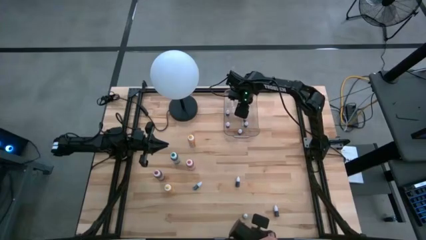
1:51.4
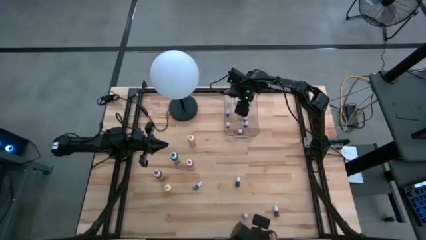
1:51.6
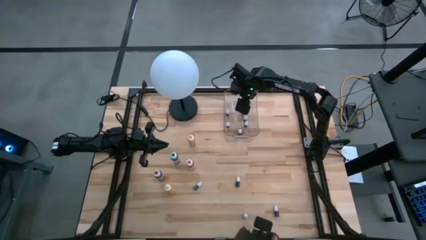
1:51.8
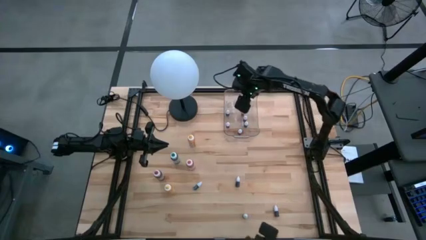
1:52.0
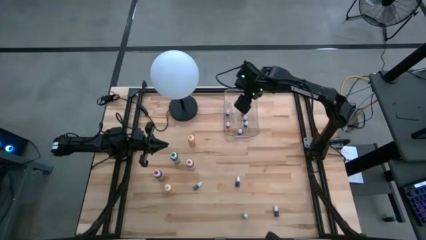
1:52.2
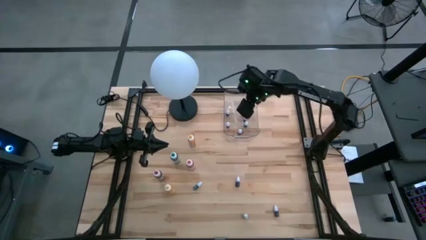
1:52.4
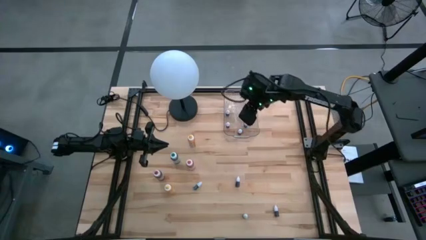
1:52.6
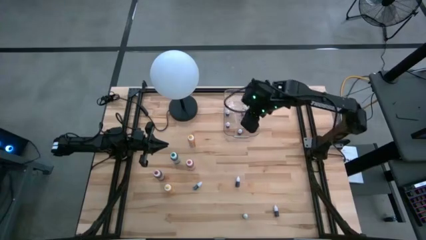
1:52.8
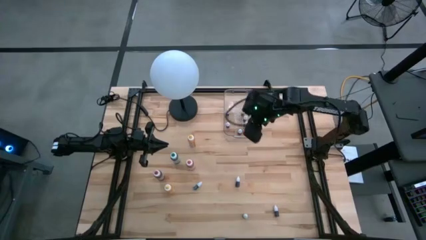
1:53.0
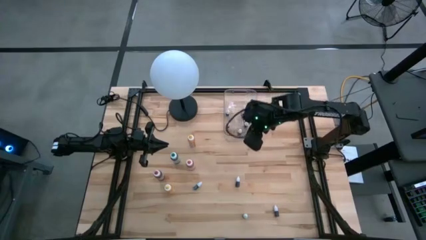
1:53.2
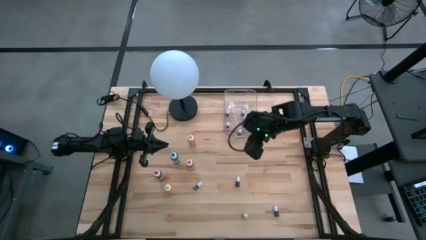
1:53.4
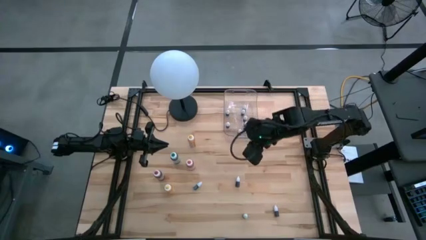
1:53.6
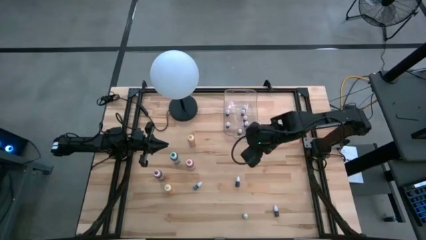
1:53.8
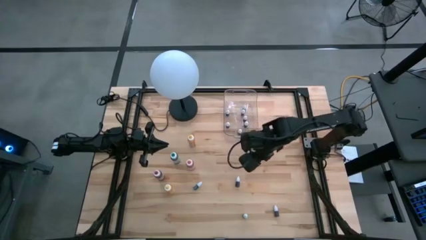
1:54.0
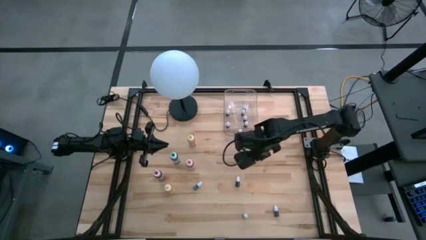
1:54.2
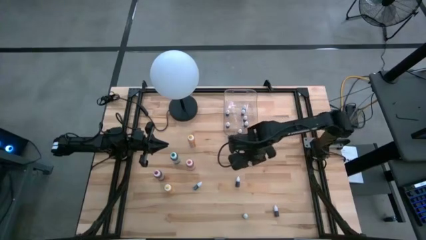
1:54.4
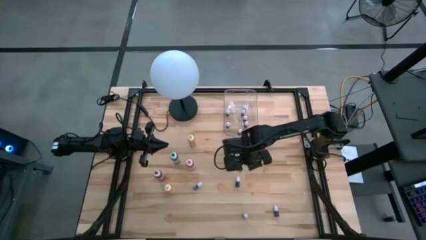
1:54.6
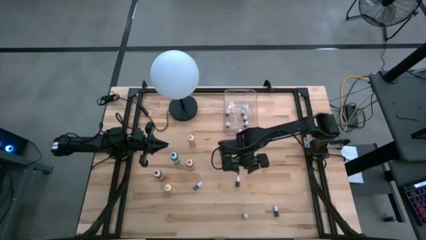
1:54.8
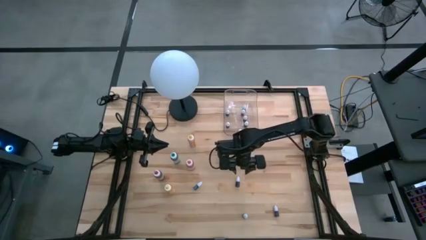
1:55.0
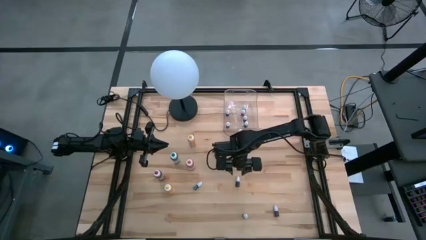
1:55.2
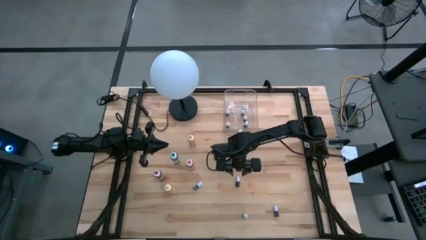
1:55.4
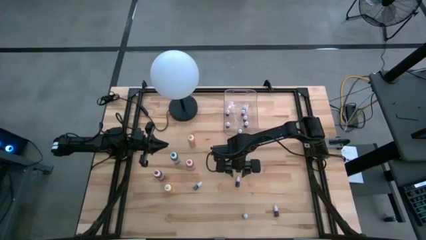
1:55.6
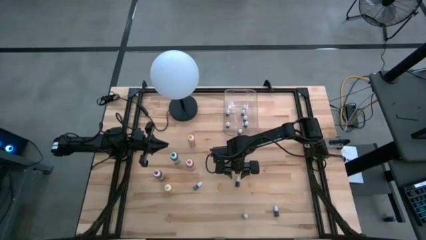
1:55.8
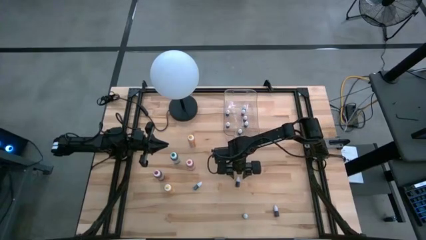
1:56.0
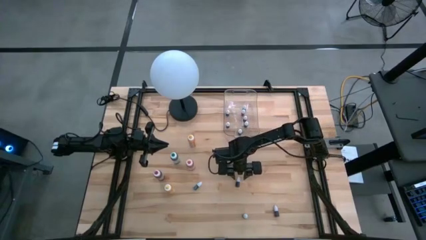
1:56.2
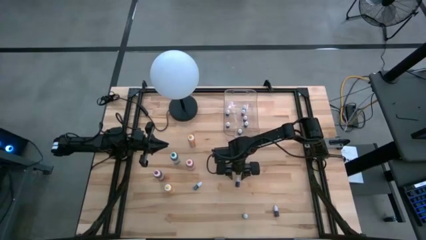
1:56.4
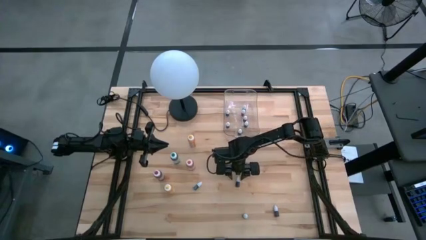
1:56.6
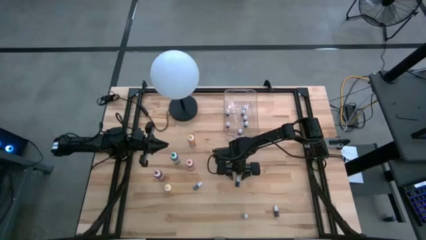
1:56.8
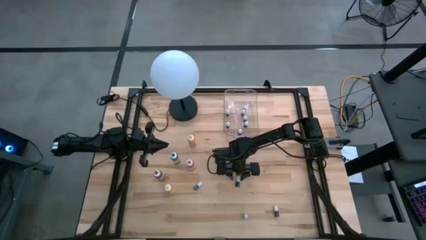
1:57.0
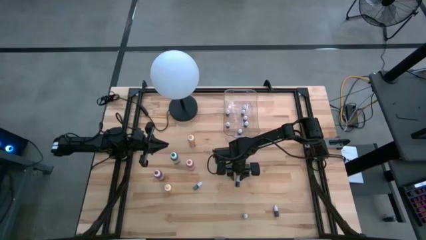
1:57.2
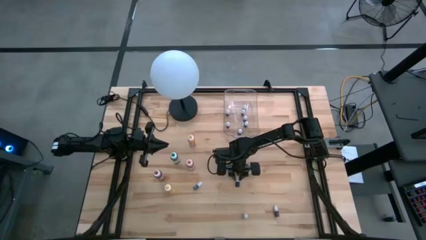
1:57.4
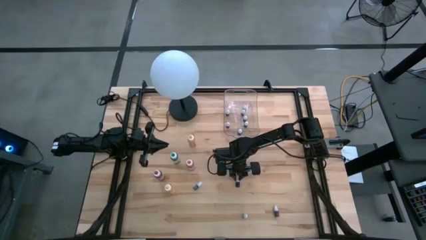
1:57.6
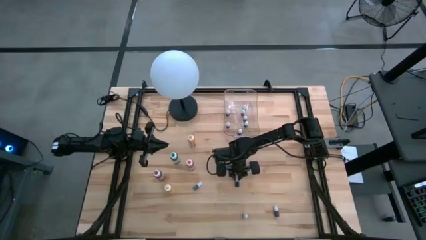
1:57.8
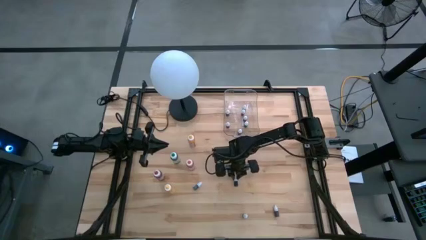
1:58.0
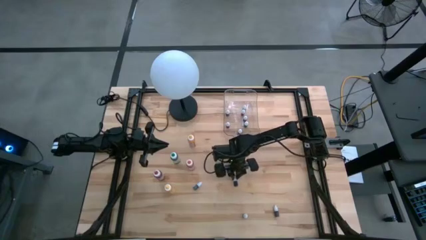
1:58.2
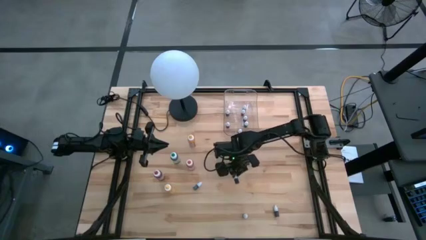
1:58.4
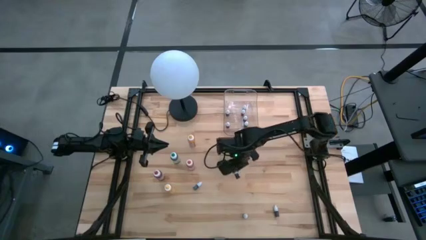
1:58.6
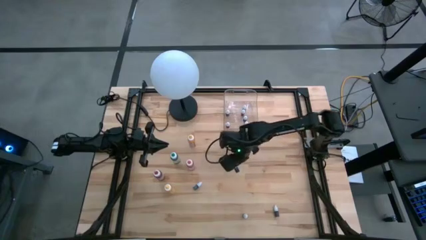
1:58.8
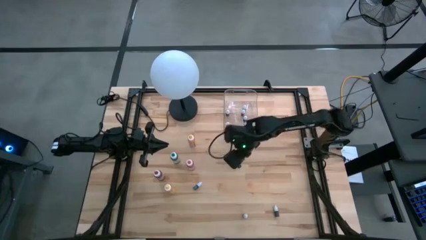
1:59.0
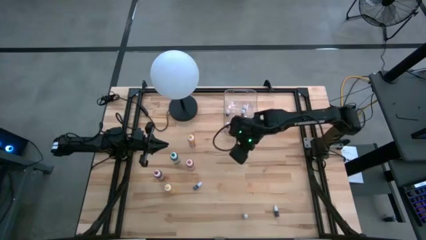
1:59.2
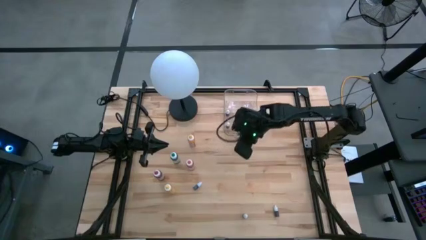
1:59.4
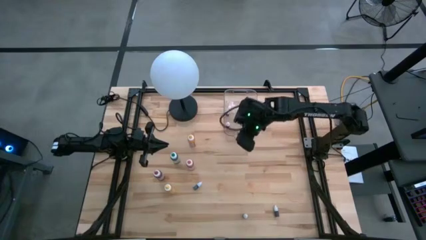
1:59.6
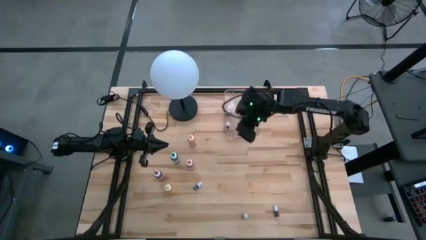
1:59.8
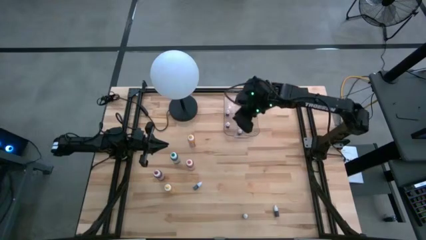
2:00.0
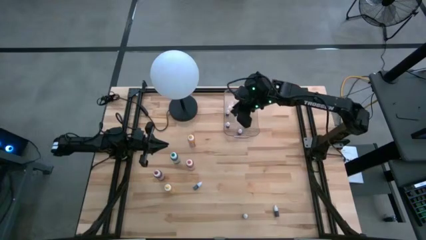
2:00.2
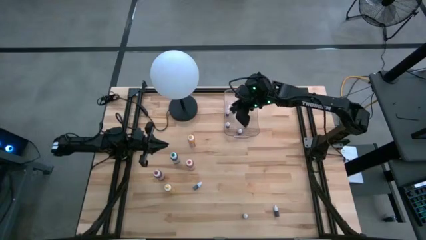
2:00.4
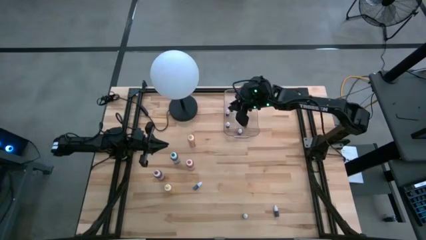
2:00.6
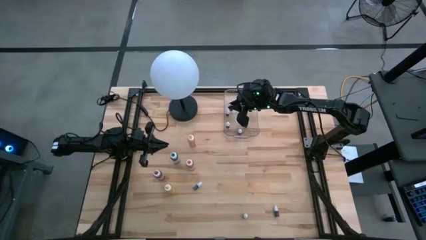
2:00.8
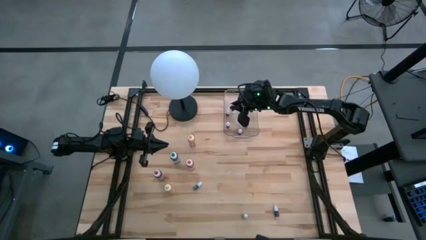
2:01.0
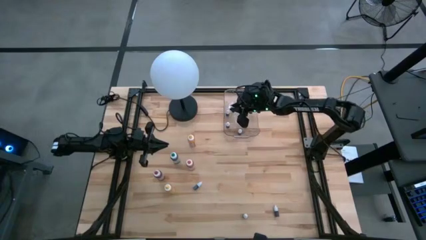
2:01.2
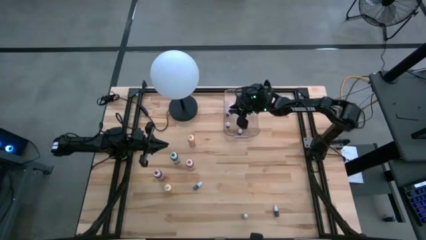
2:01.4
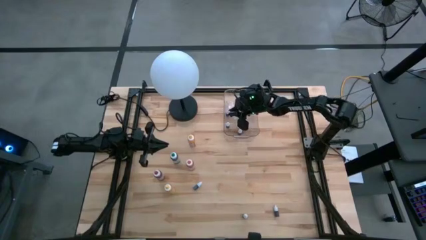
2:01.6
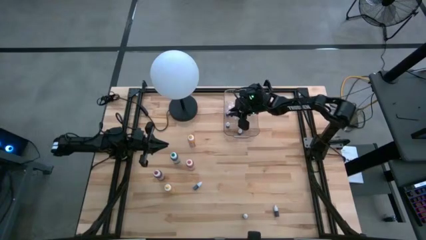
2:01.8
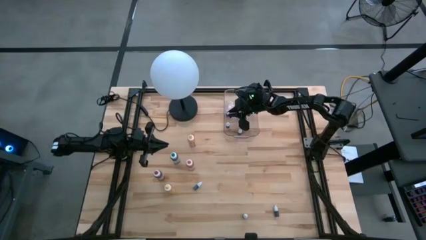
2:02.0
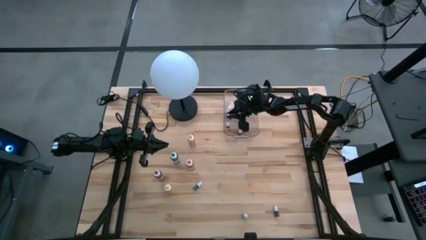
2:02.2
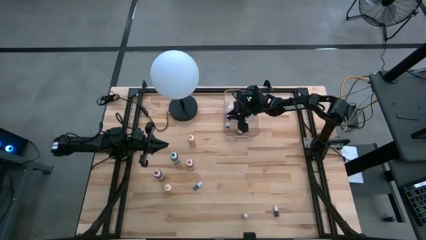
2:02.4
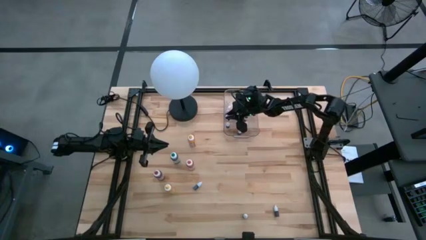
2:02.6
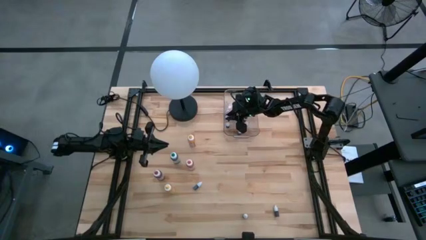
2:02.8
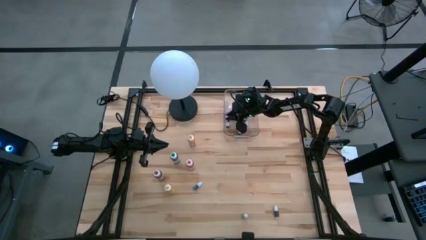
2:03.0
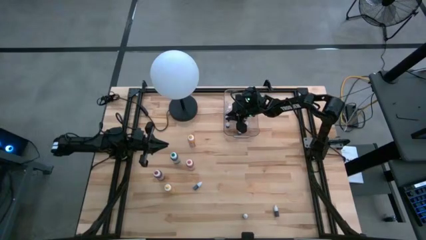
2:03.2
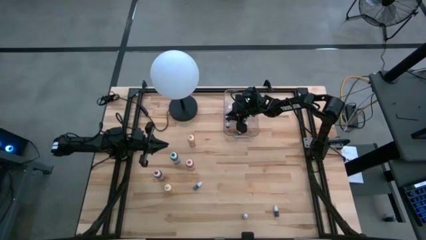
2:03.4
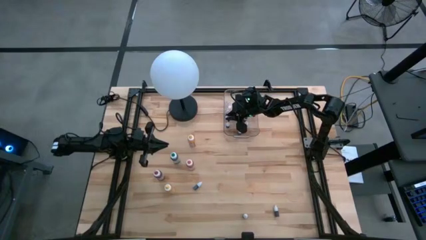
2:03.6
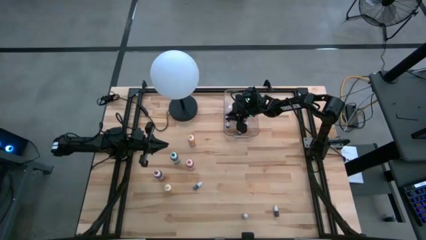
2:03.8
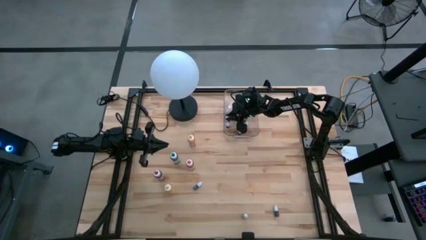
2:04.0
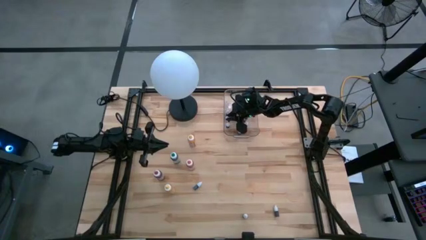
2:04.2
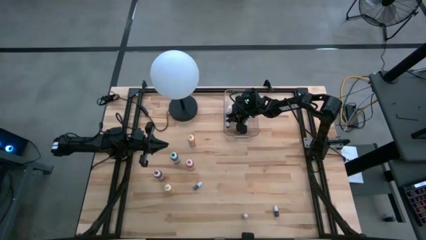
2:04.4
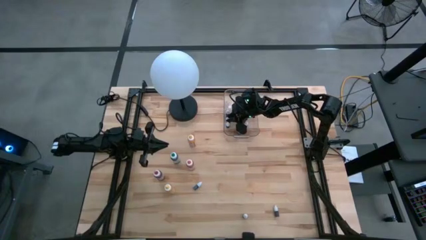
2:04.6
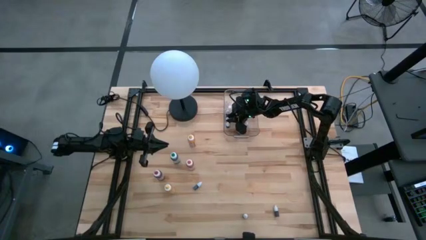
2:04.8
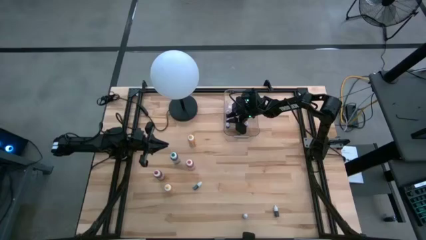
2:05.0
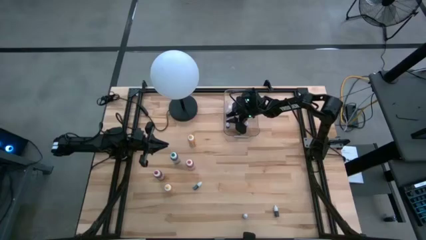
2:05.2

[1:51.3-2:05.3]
Task: Pick & Place food coloring
Put the small black food coloring bottle into the transparent bin

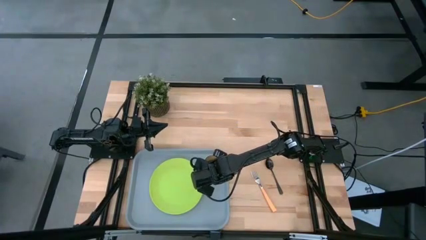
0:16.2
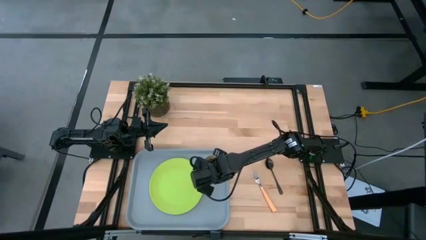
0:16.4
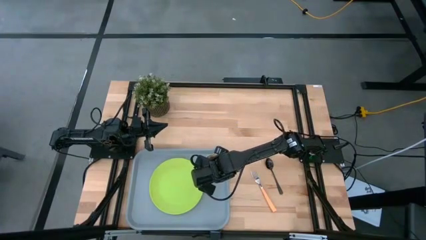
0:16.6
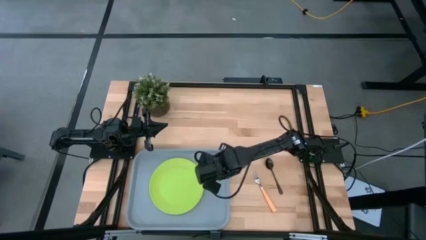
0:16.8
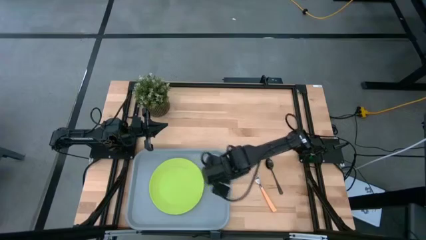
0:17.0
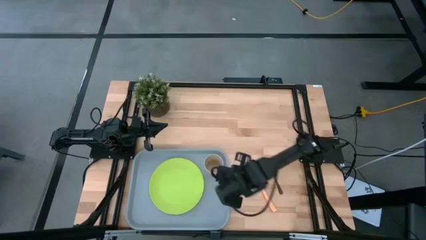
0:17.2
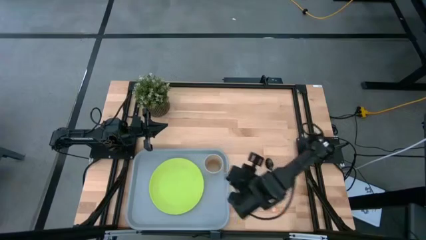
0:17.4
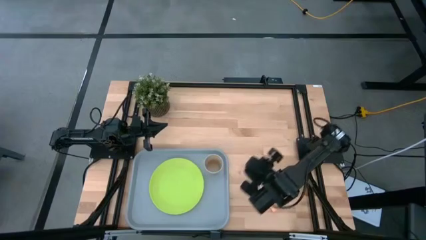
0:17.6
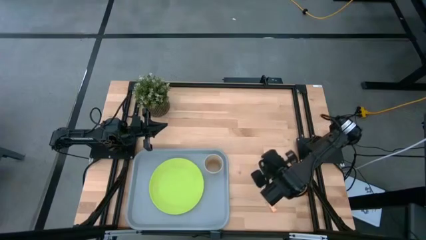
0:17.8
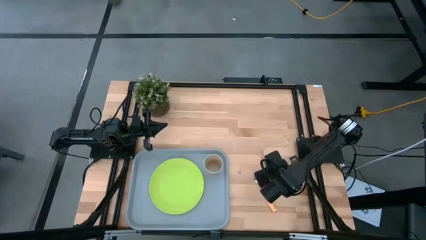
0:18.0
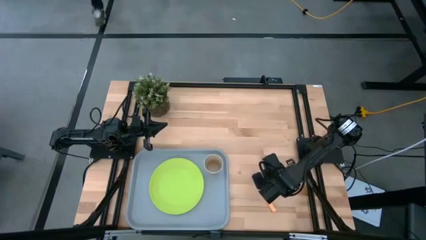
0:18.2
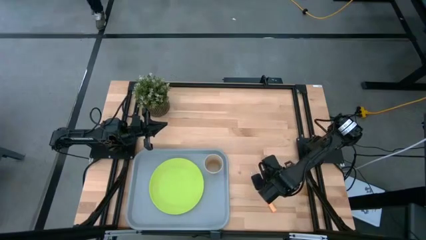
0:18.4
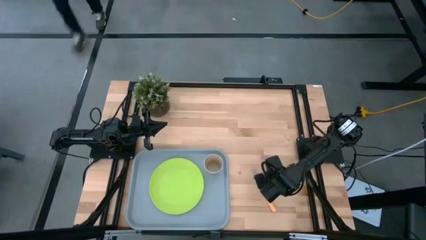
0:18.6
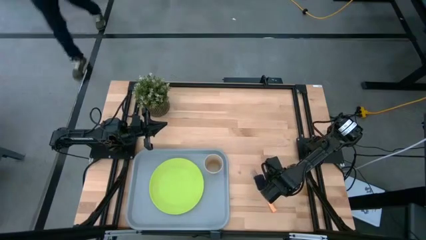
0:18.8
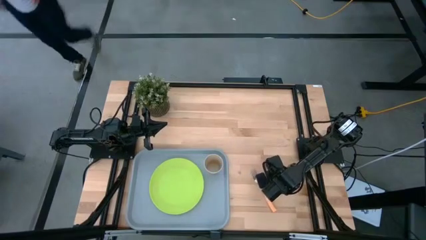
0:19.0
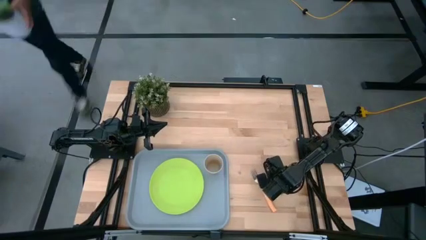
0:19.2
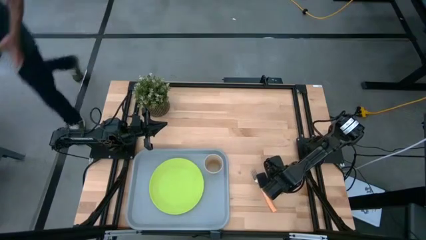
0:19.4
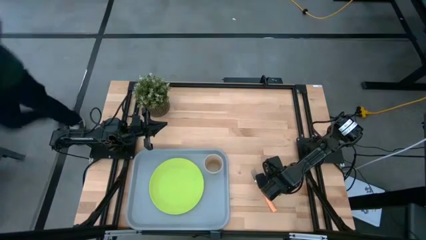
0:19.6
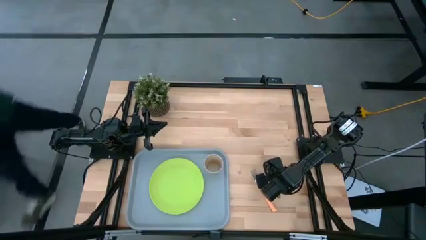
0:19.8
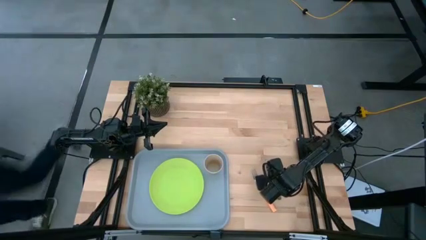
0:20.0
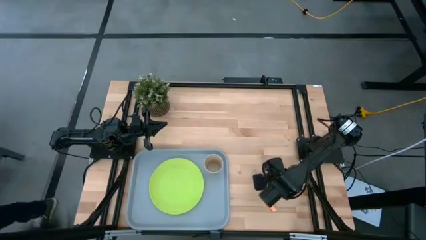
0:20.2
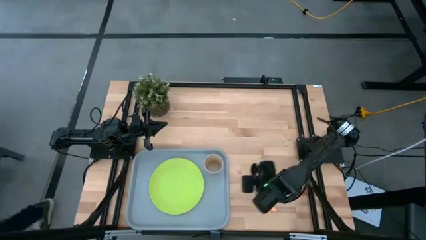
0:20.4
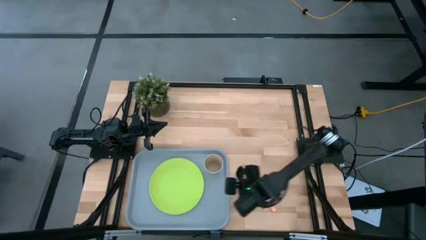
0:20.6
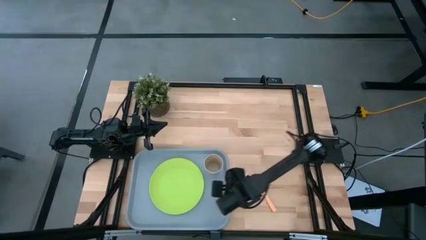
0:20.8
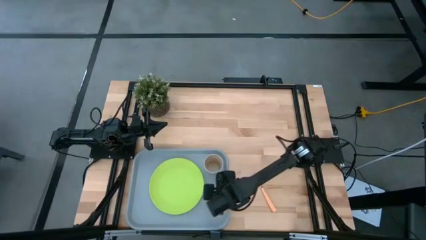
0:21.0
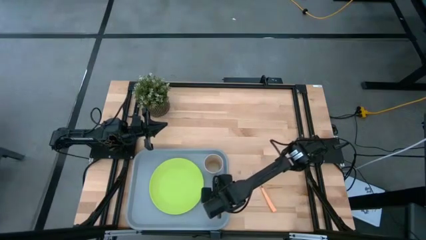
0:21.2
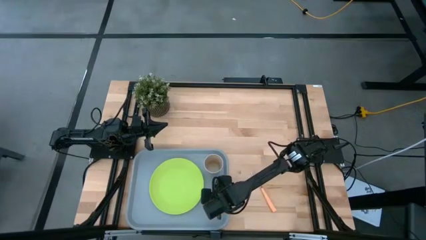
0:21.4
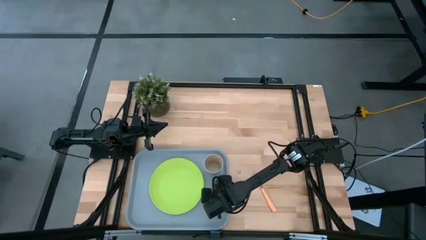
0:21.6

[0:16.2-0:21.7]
Task: Pick and place plate/cup/fork/spoon on tray
Put the spoon on the right side of the light green plate on the serving tray
